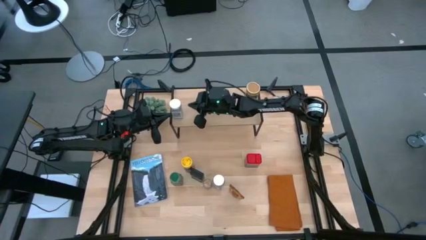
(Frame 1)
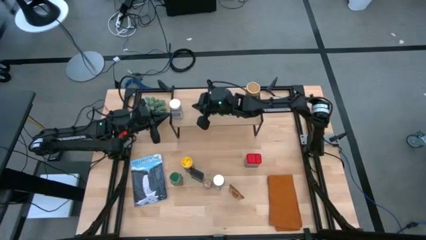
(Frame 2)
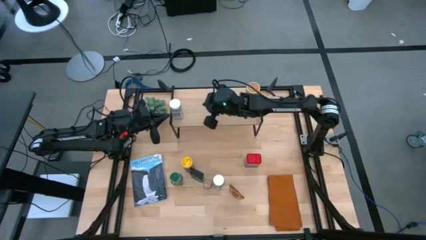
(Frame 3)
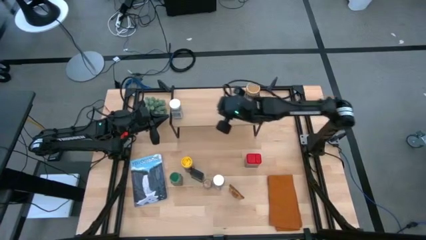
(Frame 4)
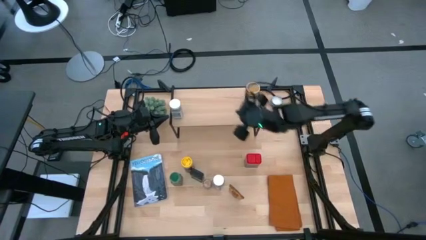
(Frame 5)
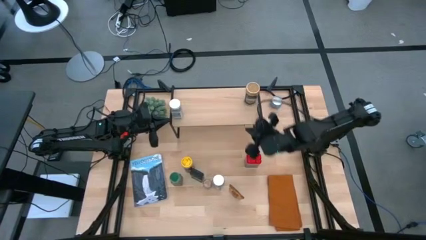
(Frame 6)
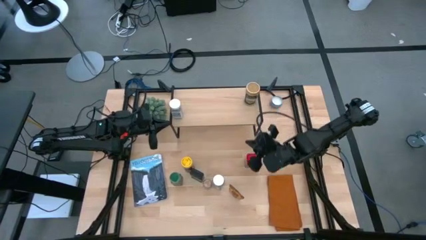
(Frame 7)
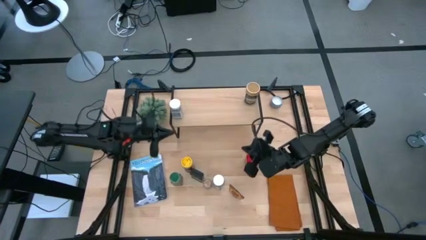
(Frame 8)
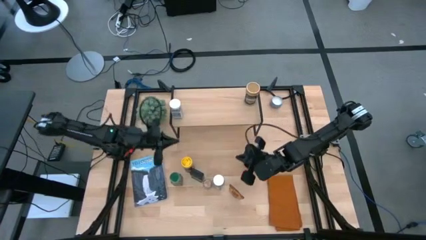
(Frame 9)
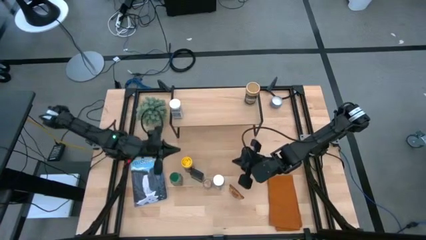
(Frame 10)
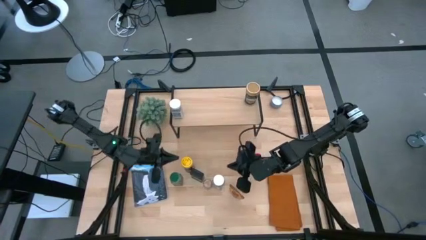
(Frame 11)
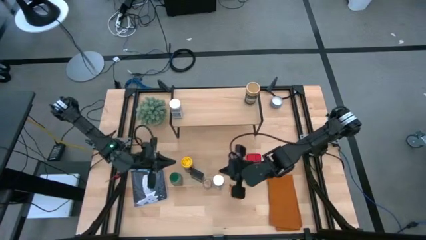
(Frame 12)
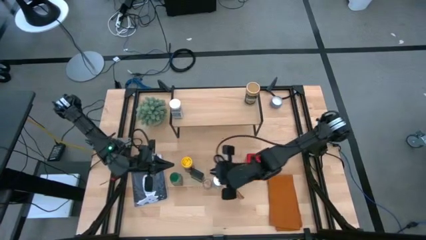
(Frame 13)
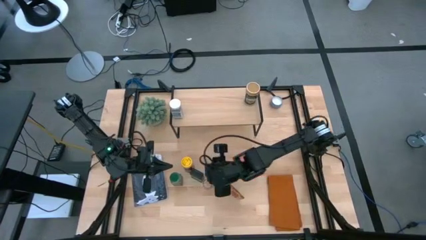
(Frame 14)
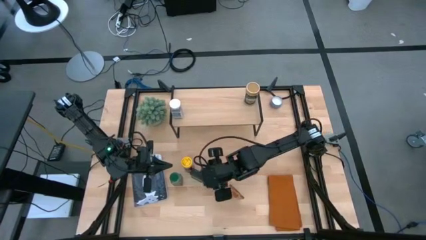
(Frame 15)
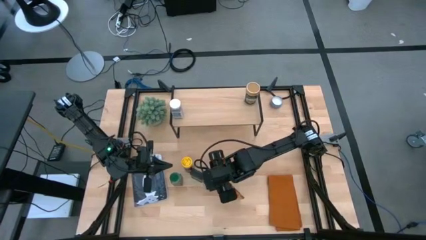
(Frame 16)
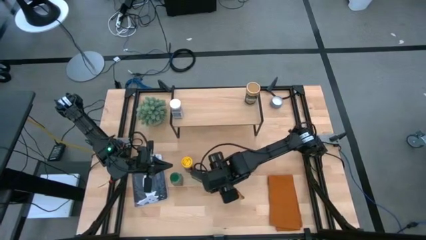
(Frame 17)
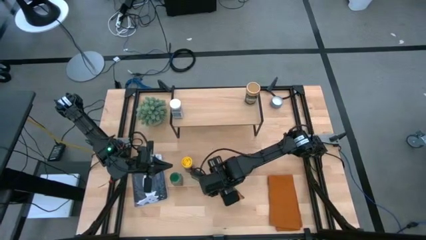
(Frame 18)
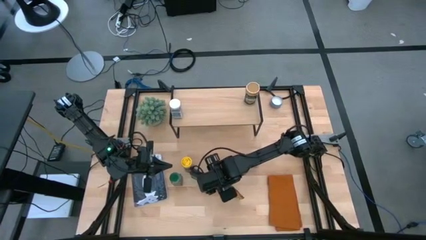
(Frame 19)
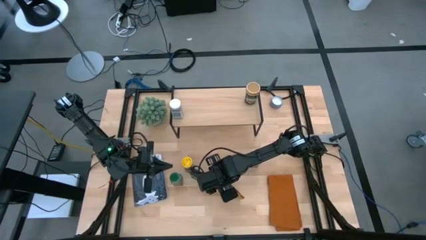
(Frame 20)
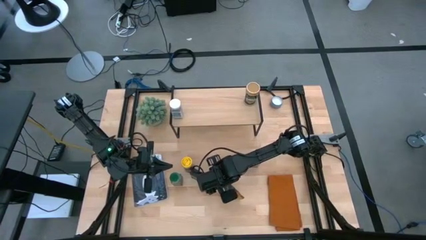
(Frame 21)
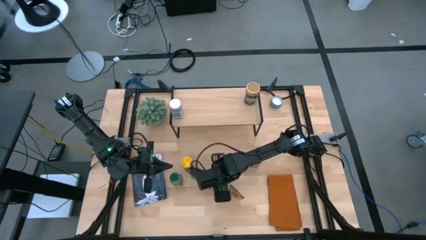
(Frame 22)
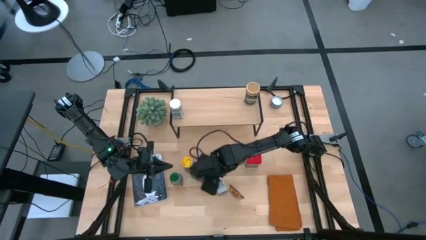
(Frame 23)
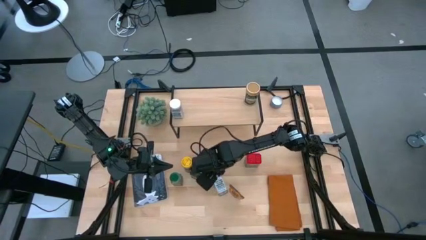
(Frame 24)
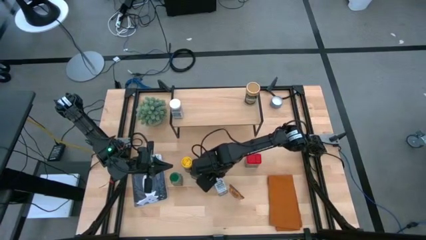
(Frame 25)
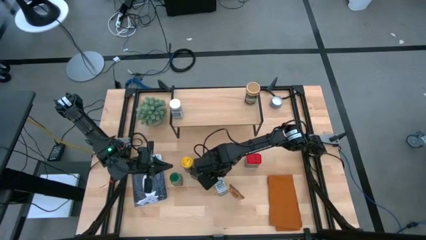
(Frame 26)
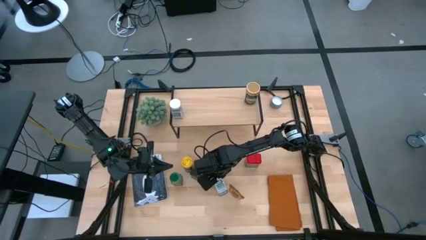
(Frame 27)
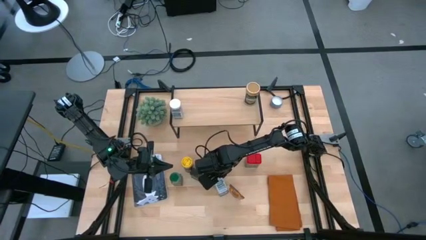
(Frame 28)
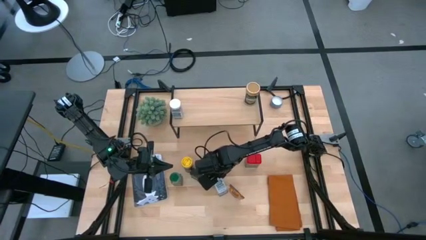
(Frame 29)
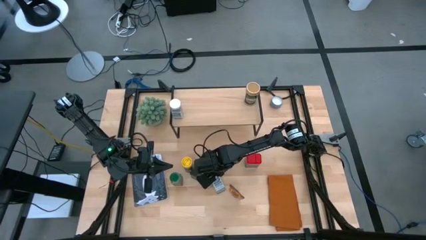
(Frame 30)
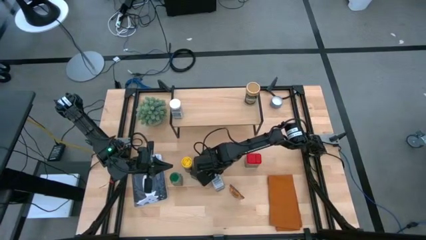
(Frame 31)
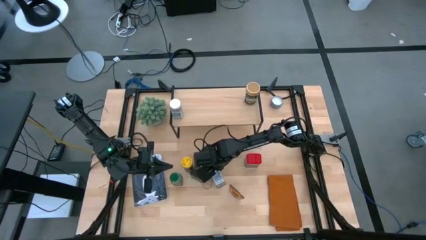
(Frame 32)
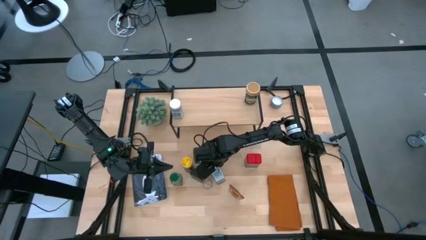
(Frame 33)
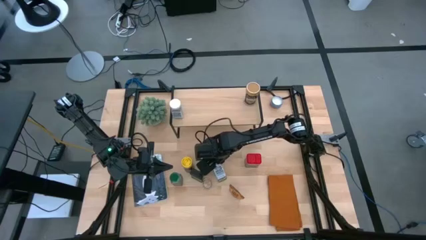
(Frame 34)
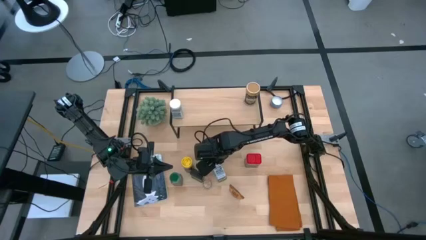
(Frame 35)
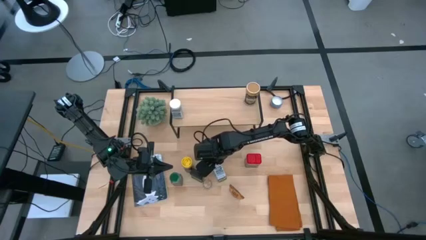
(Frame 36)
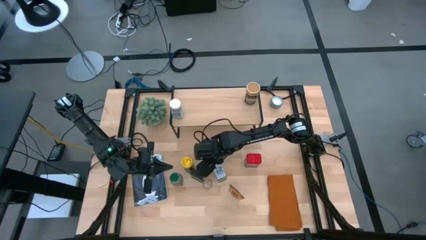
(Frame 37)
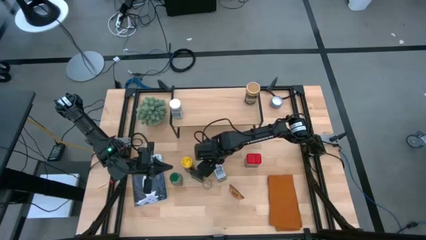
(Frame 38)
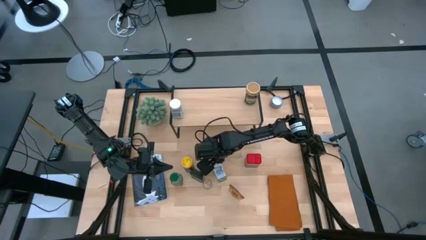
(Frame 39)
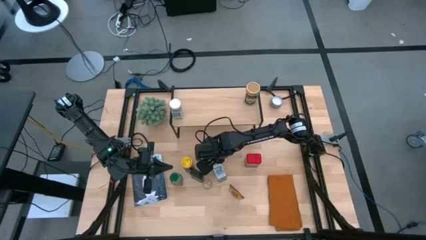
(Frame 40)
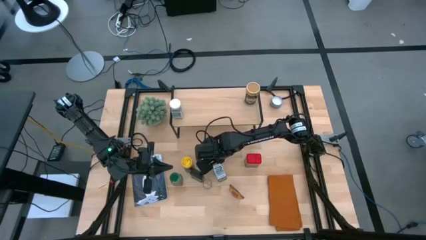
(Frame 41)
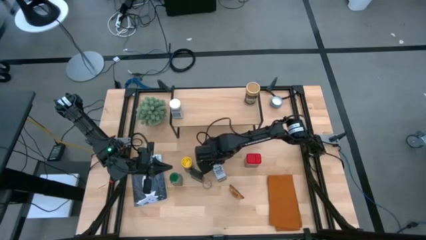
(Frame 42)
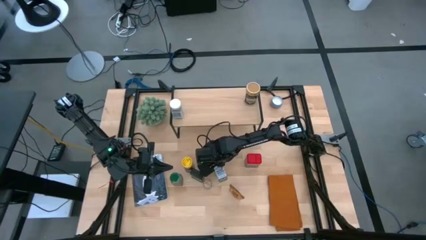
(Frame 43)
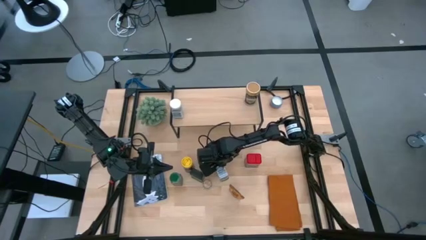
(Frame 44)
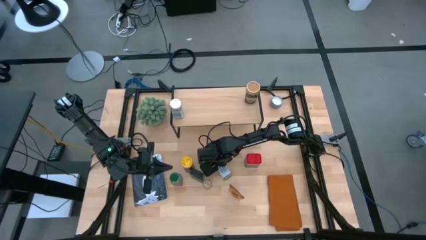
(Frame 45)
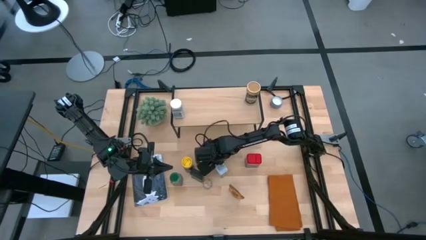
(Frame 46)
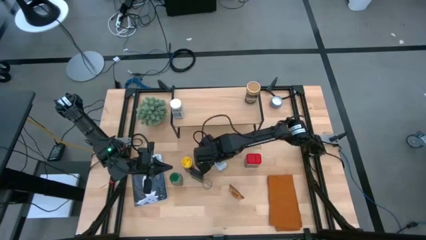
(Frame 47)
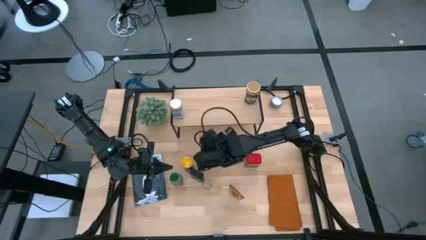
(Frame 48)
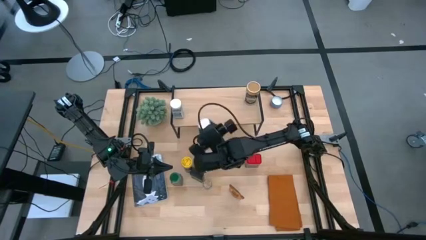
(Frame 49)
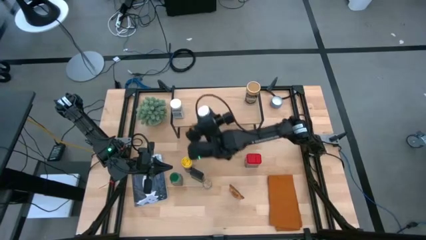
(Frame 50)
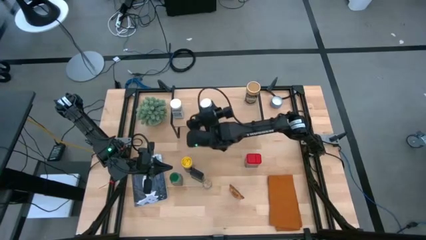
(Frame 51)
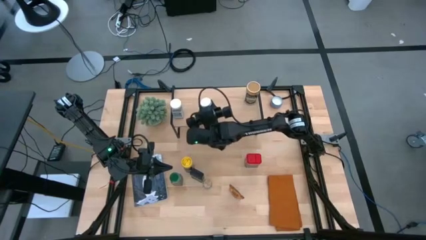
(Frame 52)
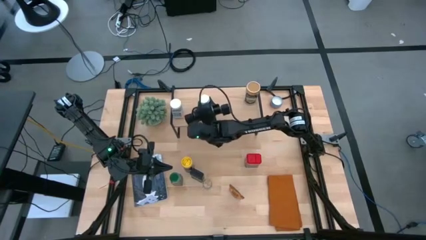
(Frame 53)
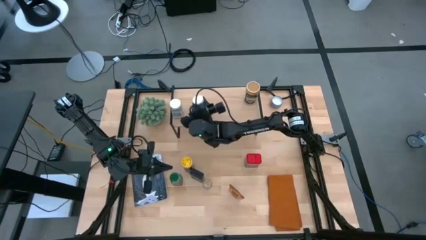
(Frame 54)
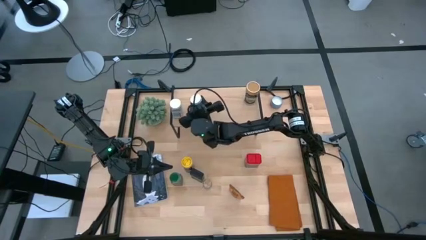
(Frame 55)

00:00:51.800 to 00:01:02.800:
Task: Shelf spices
Put the white seasoning bottle on the shelf aligned with the other white seasoning bottle

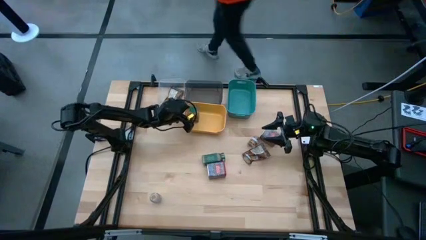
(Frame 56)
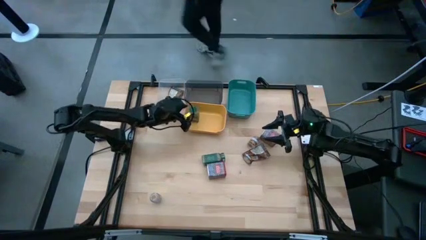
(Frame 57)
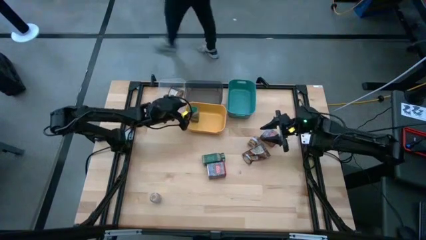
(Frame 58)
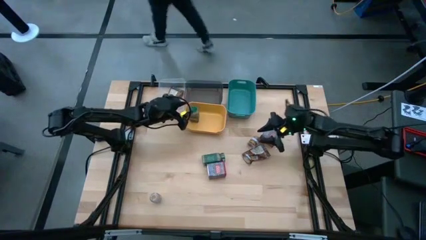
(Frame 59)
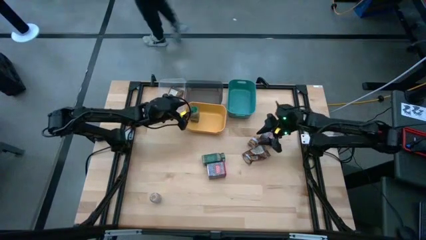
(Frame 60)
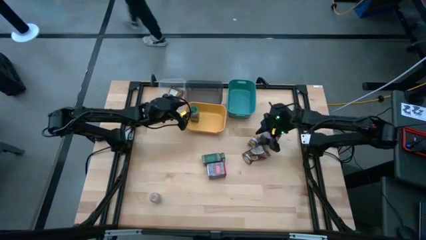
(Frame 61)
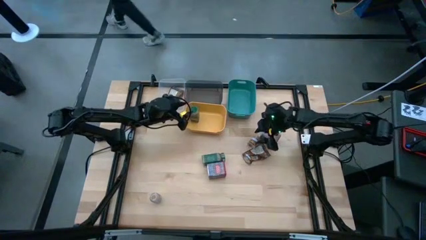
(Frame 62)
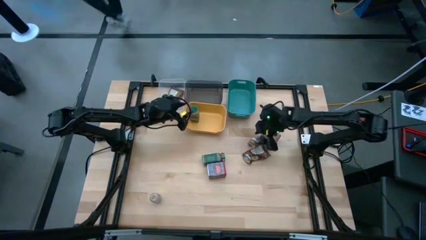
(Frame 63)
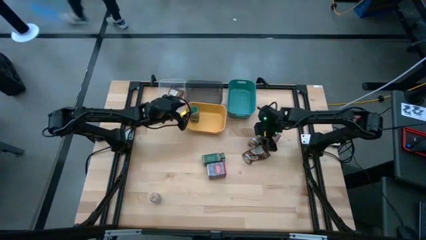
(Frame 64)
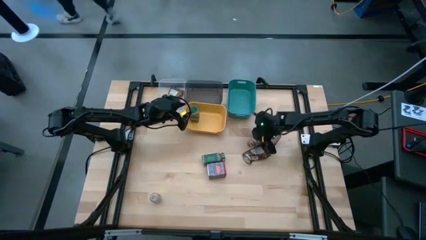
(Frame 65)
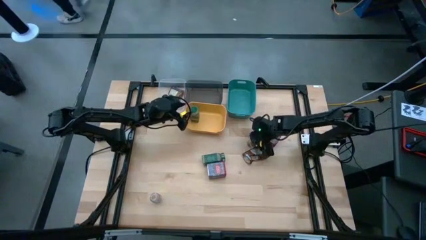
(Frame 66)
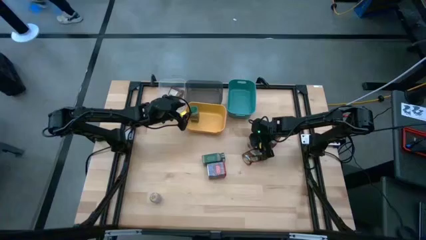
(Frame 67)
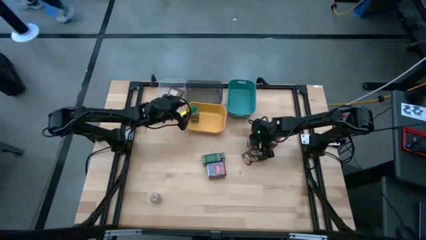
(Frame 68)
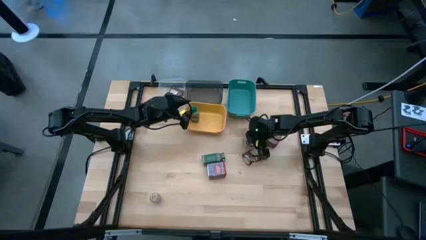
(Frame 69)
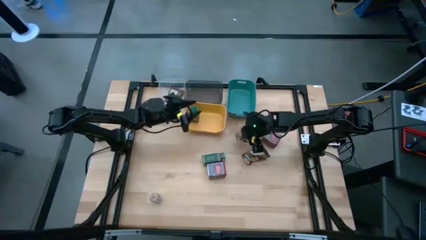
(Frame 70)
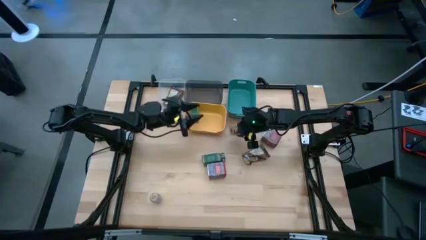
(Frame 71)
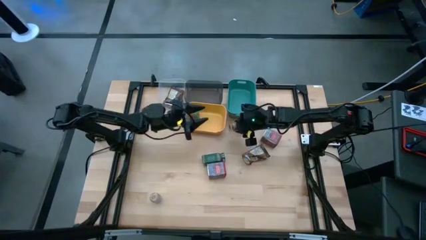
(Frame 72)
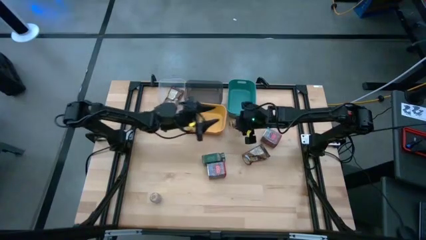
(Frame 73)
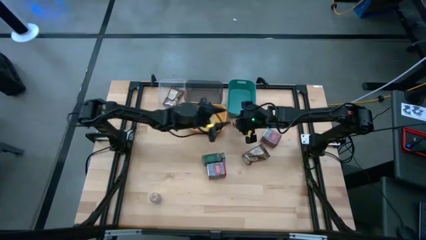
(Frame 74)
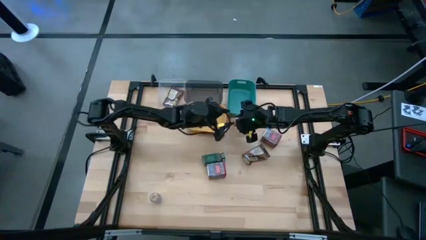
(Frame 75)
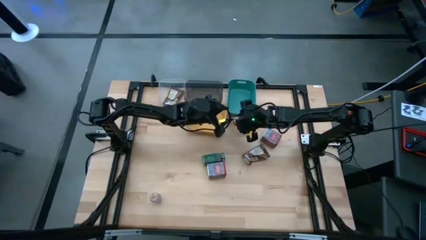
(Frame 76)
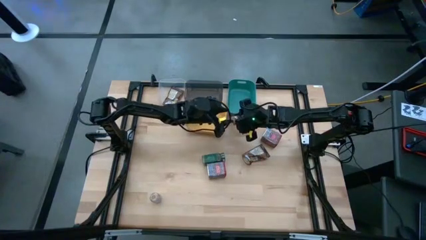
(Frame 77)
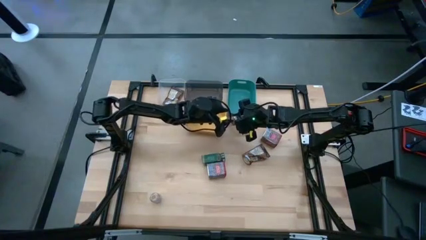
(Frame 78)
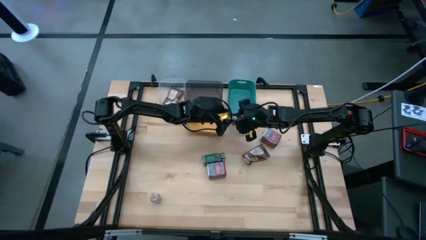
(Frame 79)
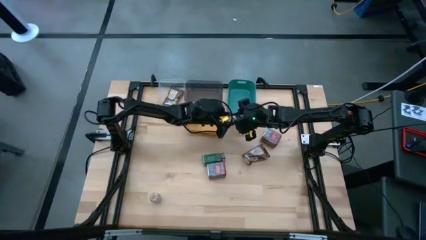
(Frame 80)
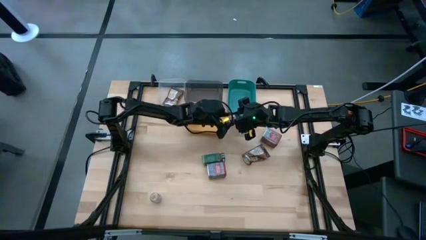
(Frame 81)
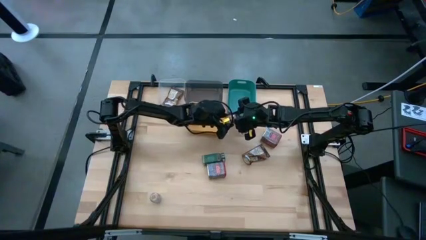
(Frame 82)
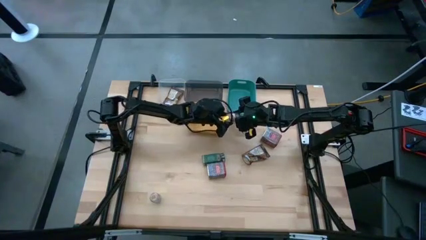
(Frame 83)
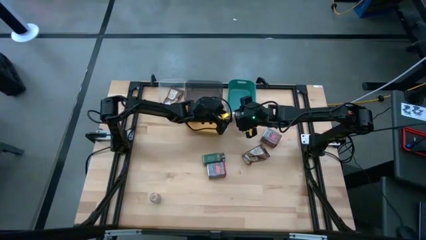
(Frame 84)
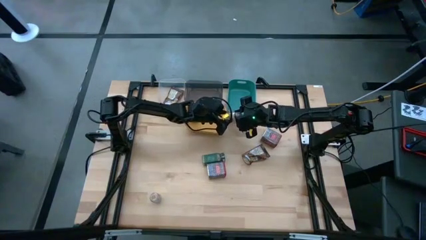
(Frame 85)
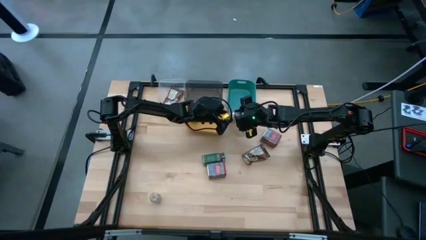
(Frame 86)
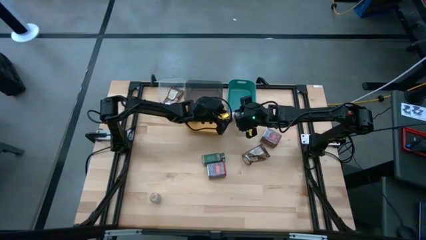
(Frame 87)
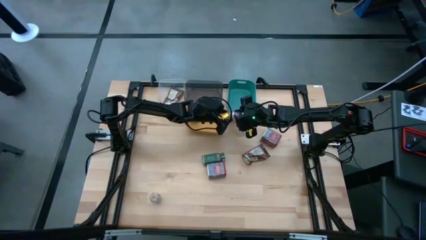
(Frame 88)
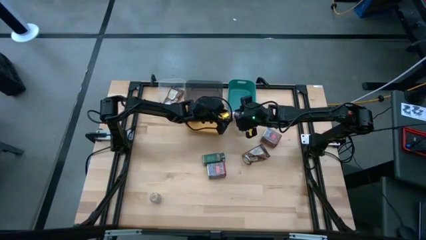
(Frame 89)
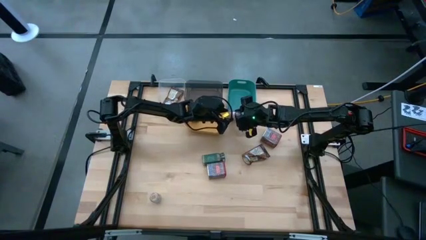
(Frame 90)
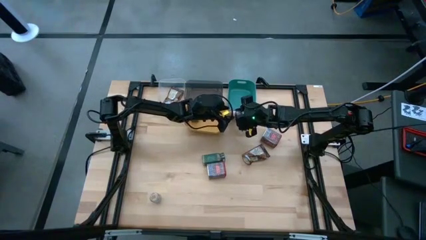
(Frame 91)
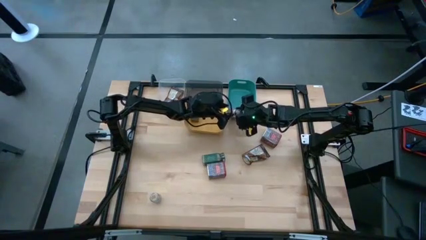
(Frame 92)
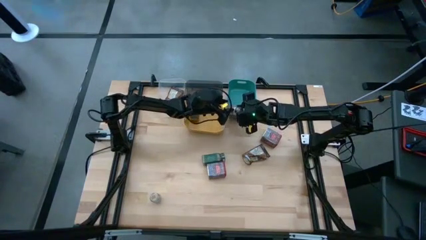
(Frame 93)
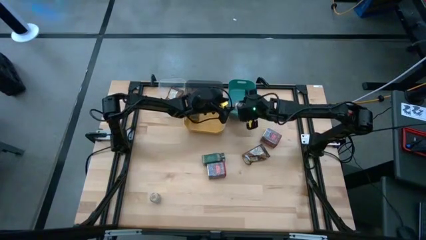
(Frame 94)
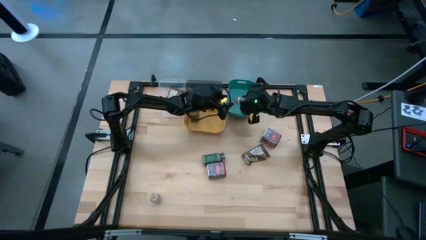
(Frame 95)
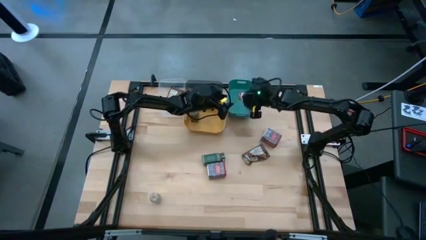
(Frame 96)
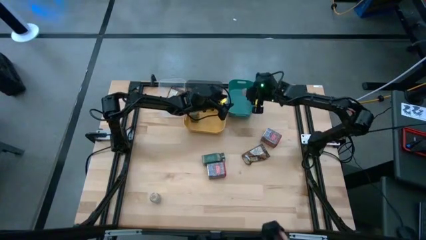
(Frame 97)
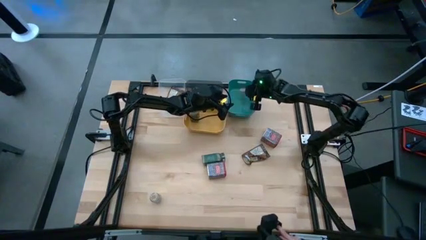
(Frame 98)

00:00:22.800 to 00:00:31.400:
Task: Sort spices by type
Put the top brown seasoning bottle into the blue bin
